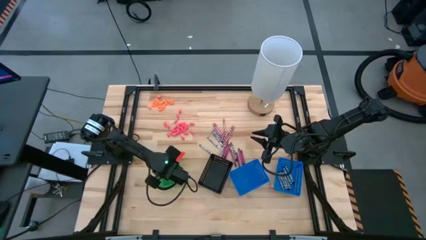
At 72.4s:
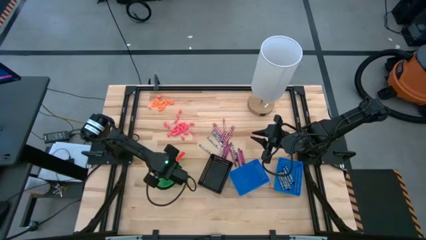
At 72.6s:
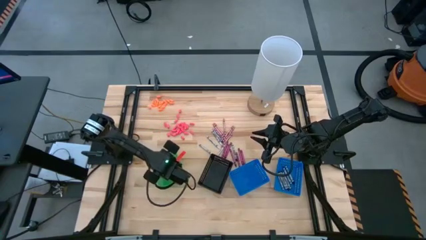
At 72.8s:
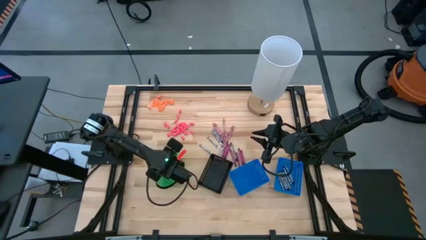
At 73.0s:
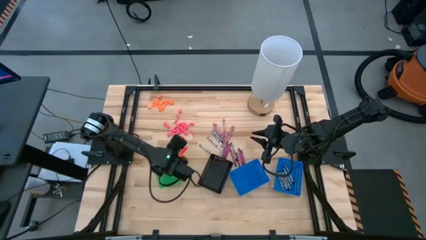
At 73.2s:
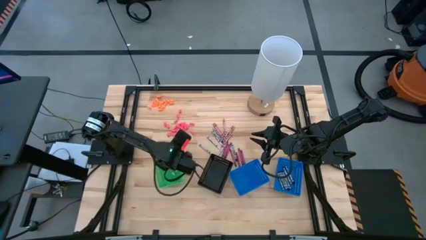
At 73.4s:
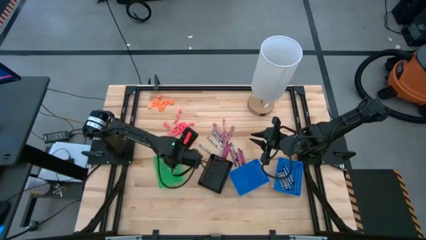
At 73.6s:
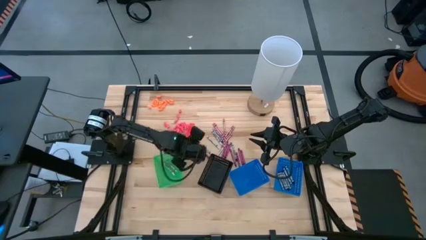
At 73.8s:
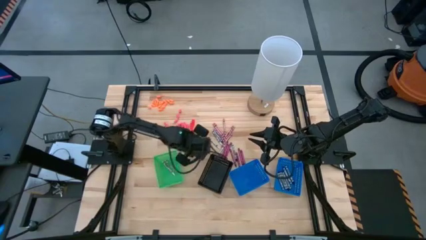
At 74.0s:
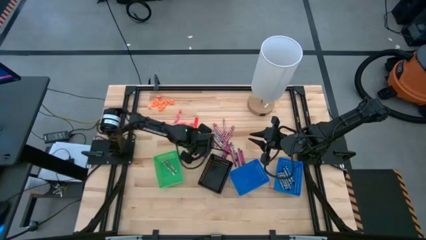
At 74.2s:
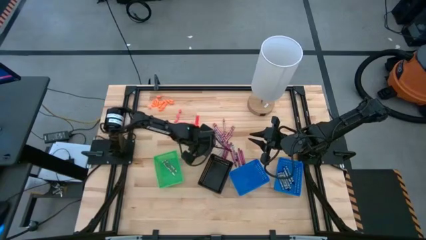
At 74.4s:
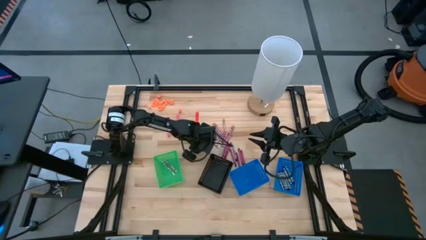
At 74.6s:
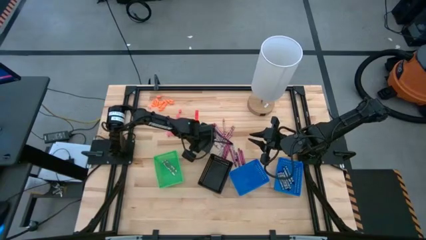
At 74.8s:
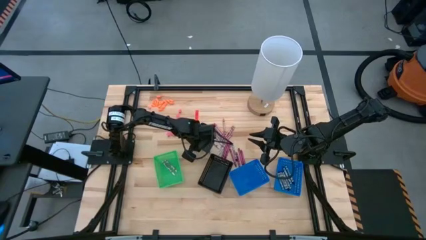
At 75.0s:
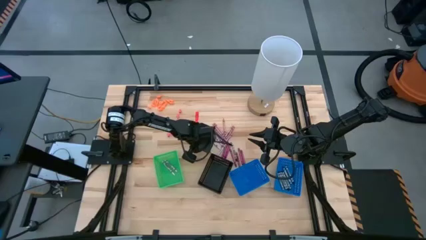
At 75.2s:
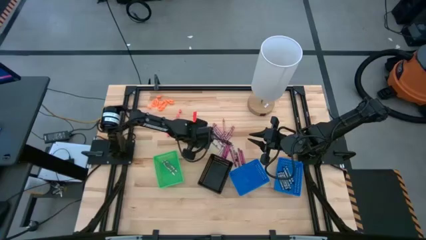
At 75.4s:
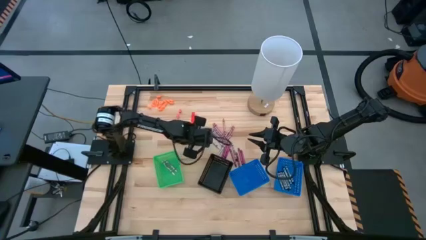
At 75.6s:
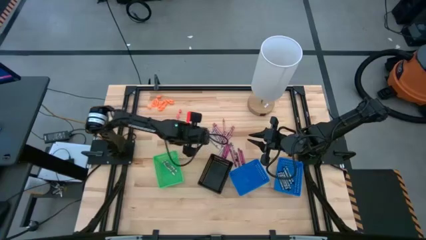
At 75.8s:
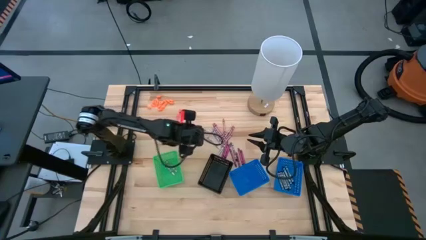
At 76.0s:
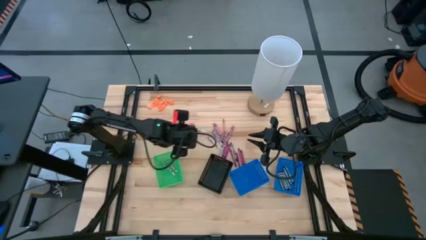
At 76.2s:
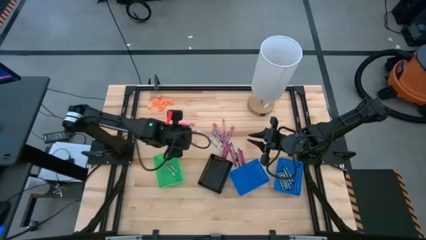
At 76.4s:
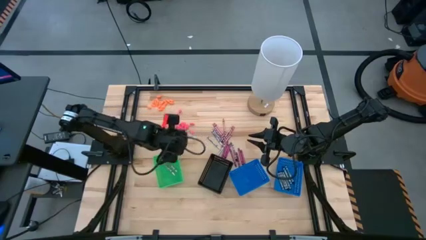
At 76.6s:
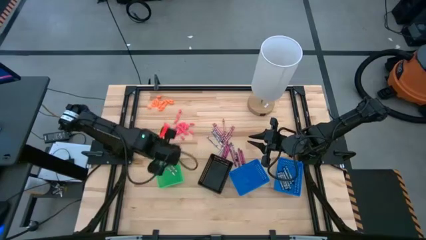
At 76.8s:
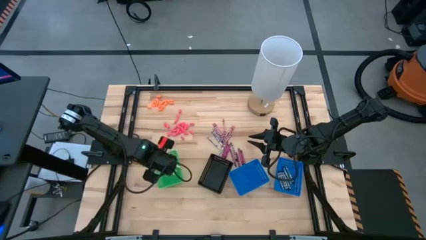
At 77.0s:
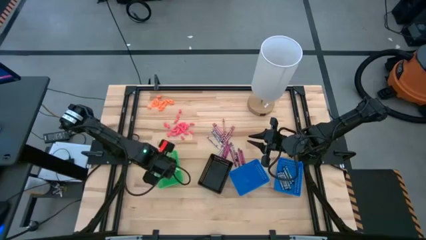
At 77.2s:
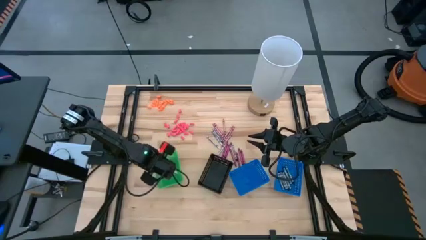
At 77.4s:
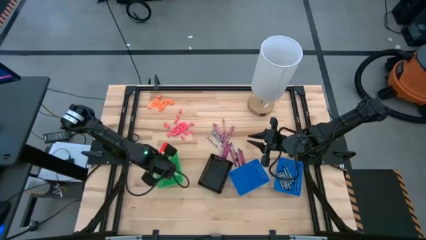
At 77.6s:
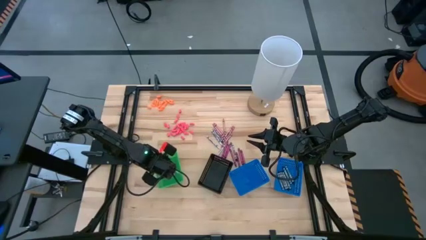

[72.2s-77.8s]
Task: Sort crayons
Put the white crayon into the green bin

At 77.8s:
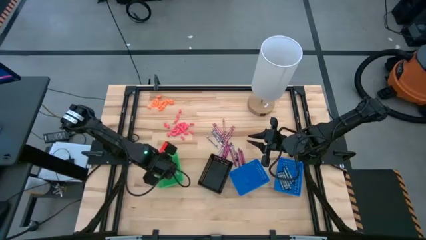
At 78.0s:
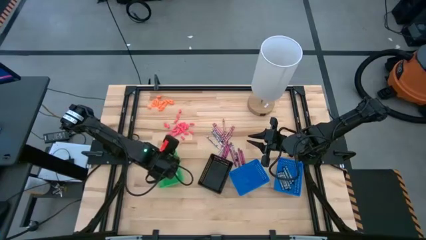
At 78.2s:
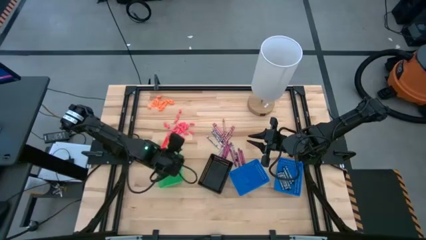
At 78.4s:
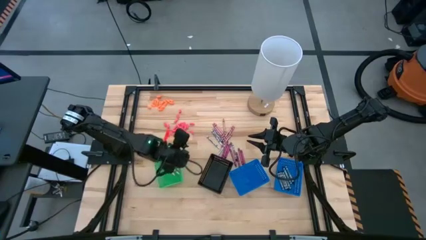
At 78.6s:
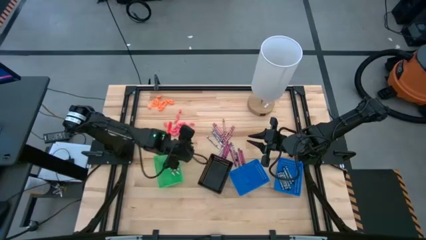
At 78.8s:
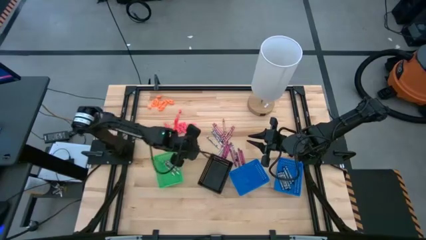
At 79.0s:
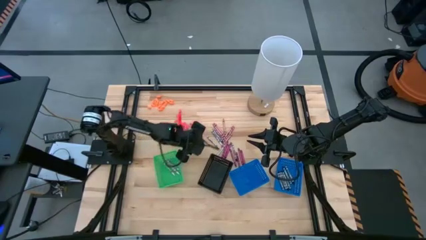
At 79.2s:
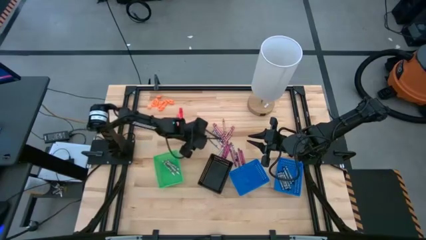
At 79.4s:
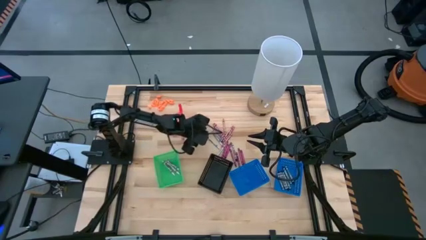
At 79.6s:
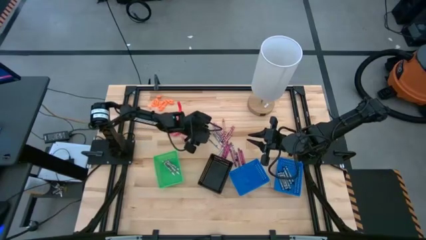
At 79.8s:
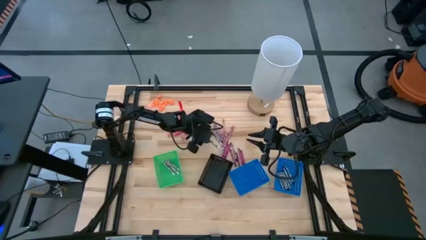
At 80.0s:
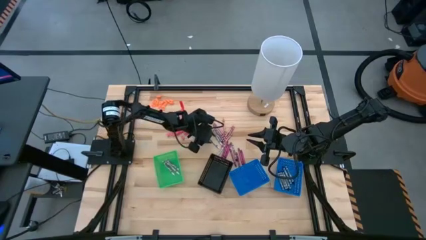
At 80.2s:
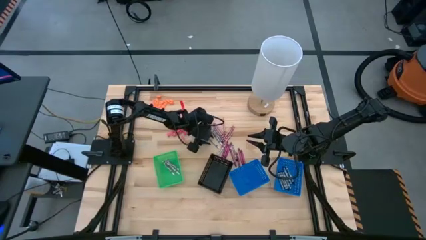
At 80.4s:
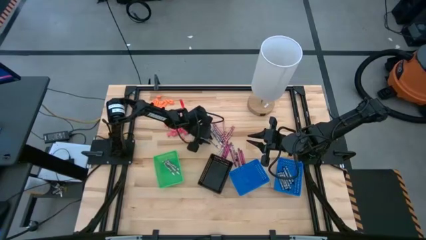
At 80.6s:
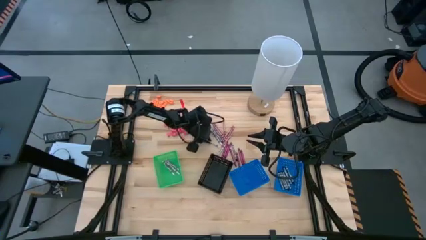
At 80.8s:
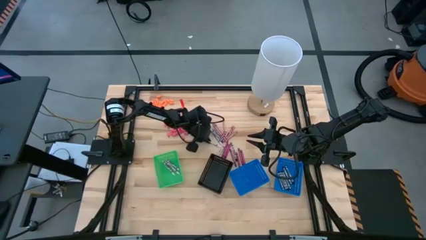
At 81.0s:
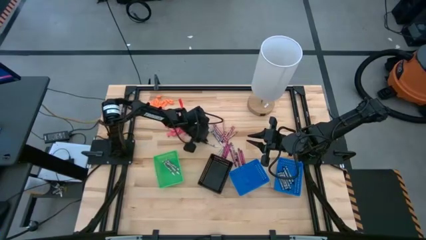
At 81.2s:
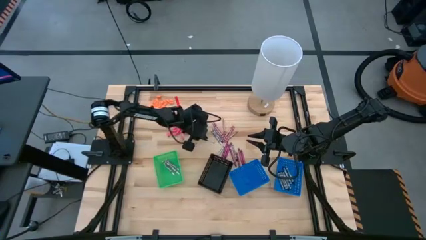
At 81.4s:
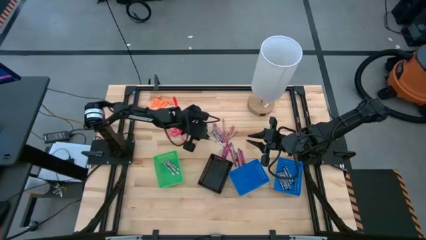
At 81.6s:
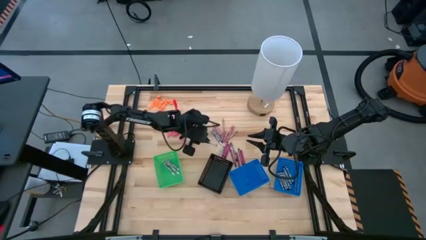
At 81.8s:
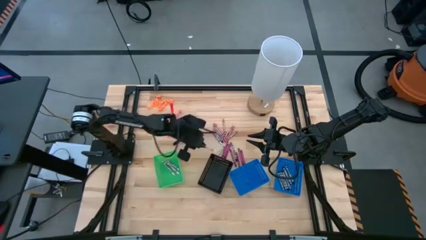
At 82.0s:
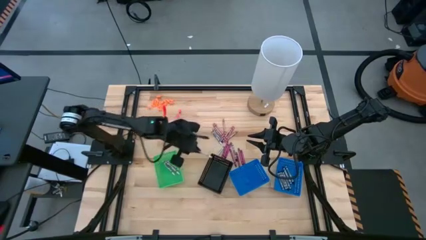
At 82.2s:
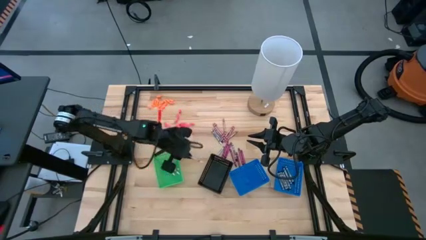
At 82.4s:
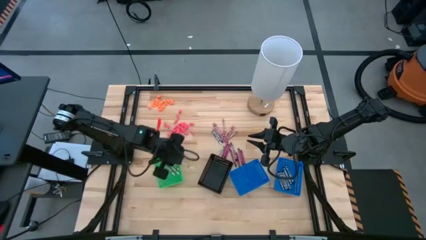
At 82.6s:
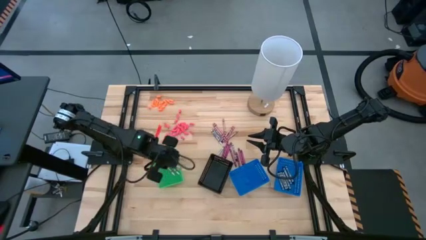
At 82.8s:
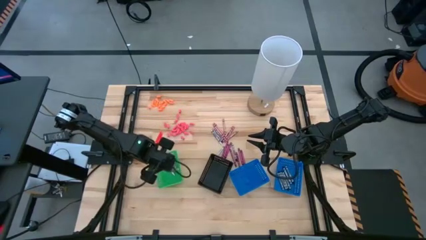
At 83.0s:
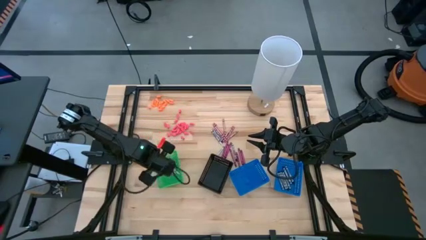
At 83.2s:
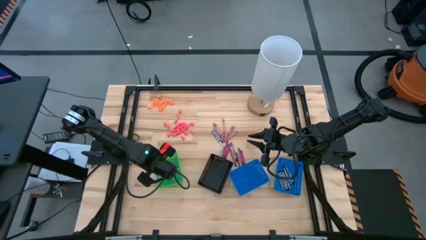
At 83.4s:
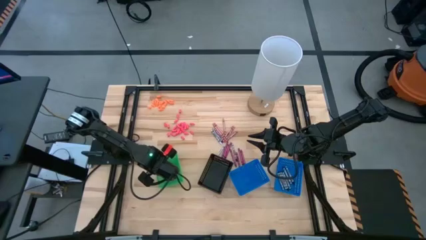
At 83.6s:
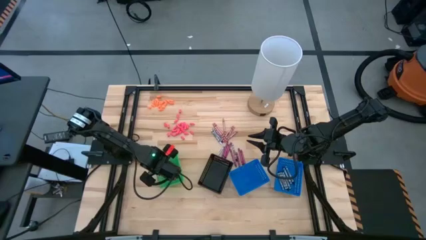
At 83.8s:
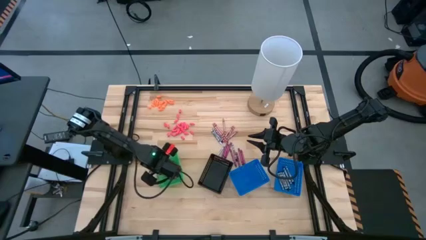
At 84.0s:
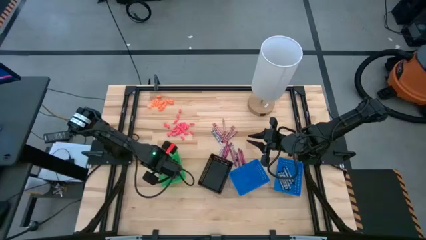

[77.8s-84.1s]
Put the white crayon into the green bin

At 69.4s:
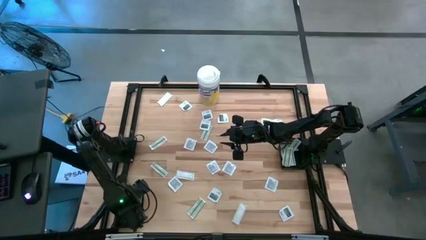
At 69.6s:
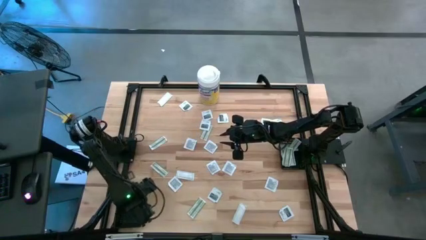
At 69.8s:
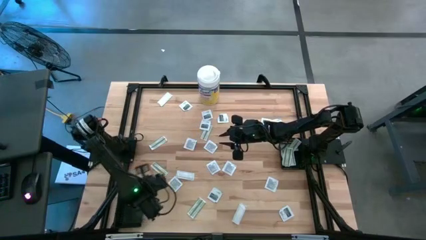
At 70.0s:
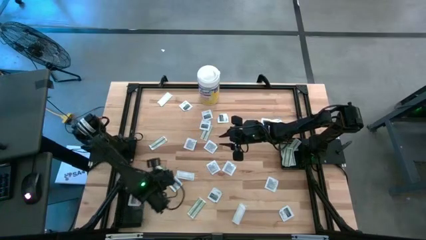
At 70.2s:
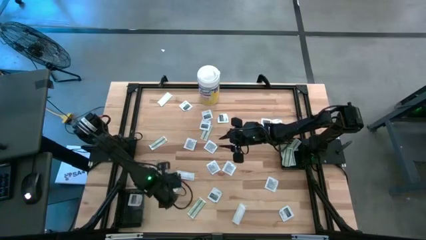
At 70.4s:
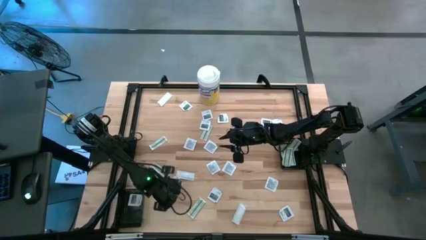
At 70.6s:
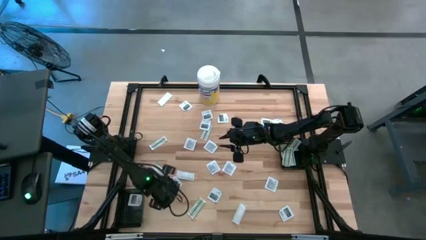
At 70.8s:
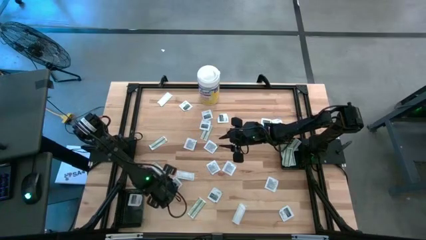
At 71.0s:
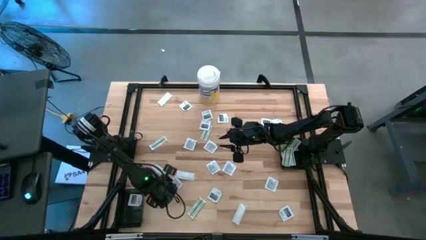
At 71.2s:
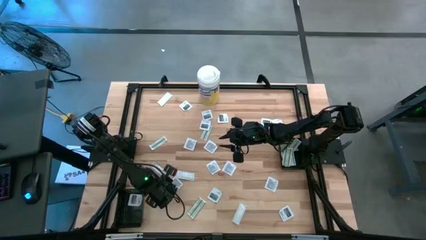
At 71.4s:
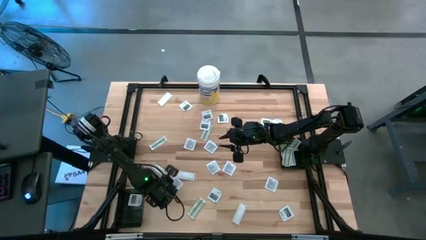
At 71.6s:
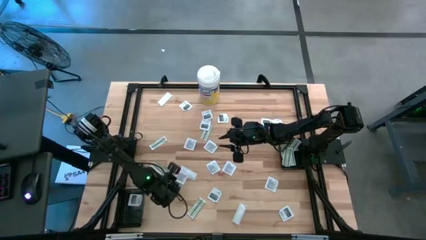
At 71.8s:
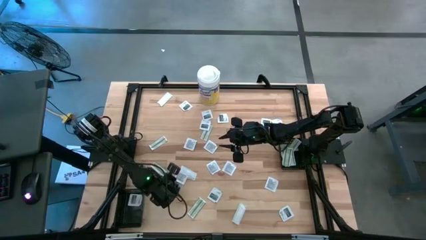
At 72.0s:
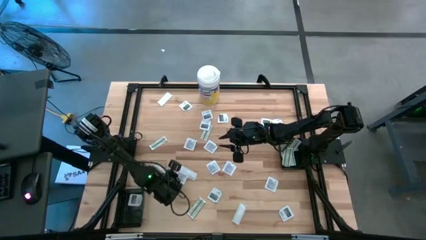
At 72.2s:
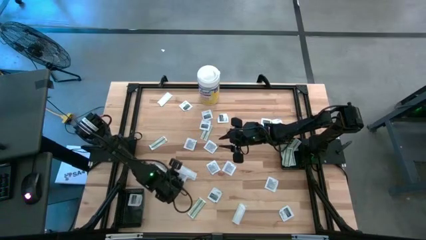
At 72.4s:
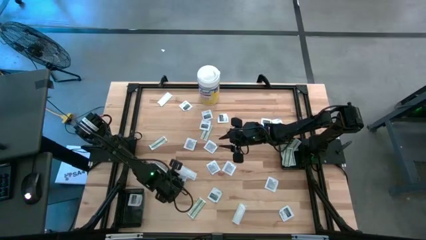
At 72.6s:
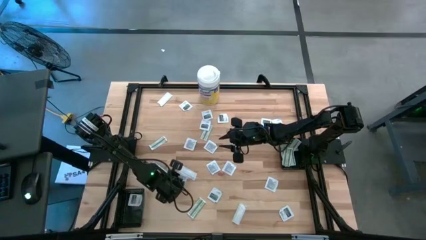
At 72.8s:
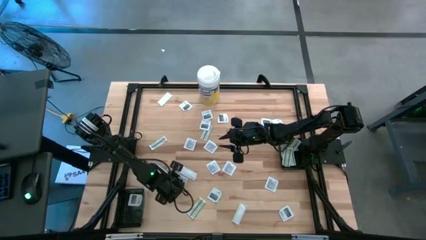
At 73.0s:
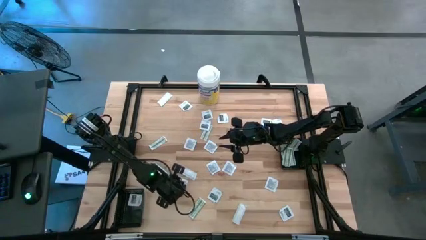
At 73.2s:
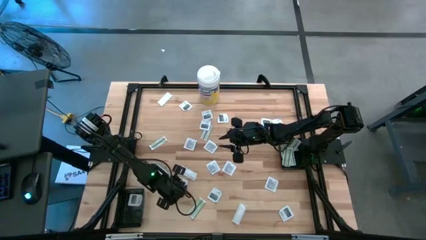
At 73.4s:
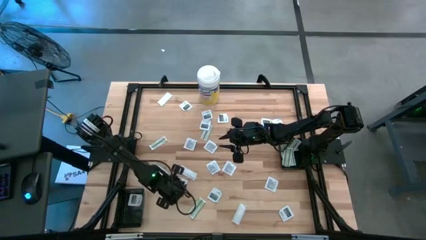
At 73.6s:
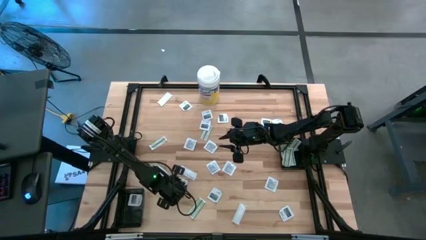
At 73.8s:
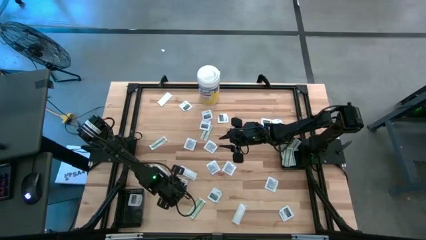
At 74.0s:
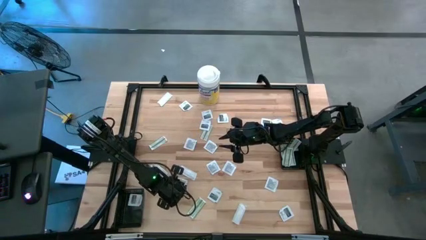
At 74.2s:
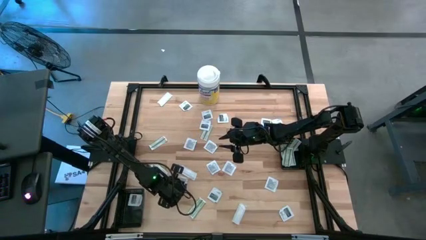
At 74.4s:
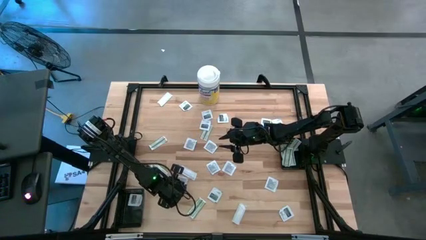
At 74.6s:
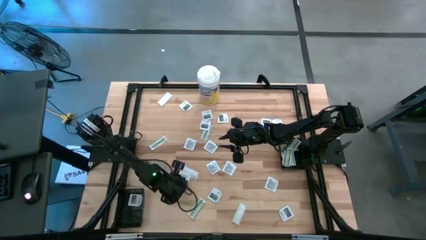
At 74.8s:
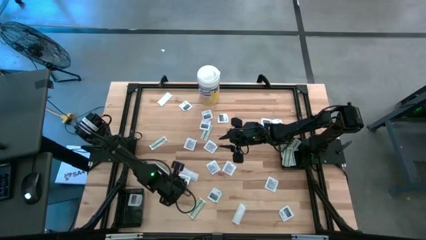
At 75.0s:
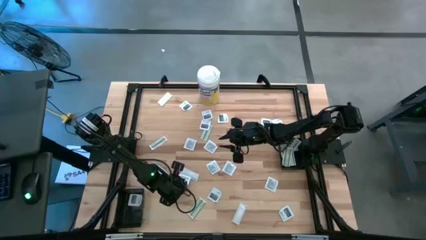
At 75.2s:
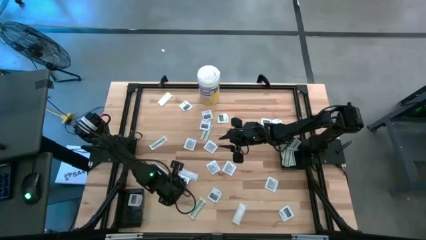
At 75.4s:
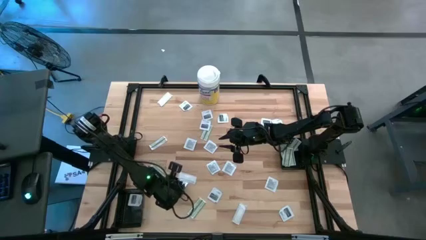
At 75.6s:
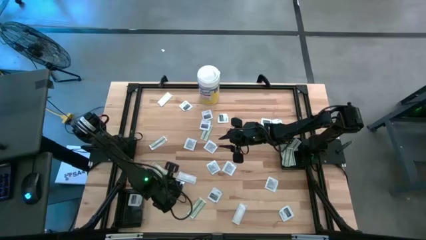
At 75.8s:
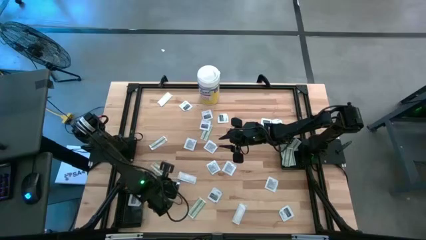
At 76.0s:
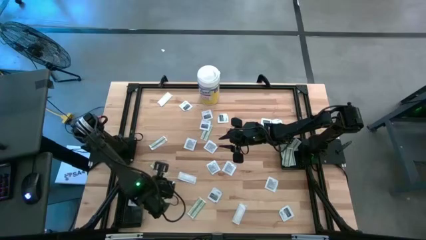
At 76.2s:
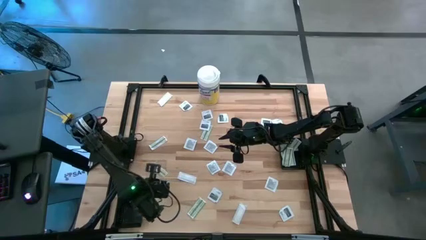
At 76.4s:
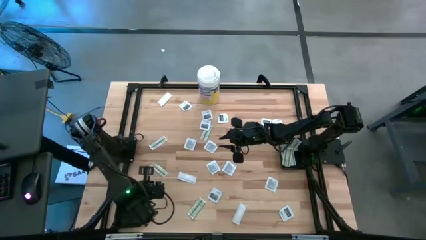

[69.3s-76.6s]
Task: Pick & Place First Aid Supplies
Put the white towelette sachet into the left black bin
